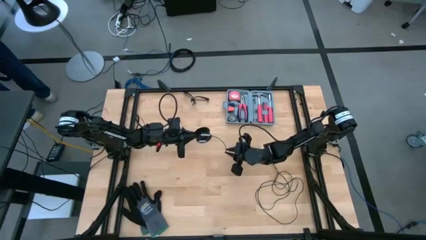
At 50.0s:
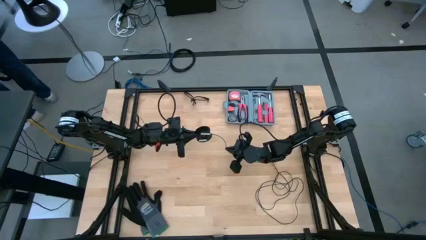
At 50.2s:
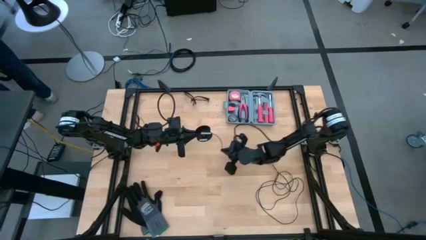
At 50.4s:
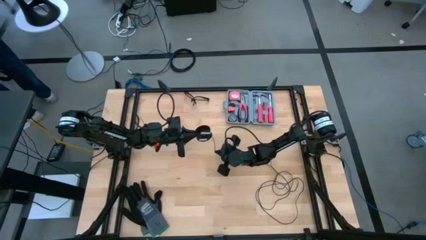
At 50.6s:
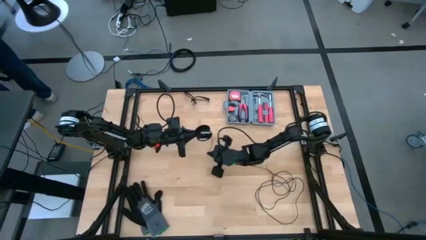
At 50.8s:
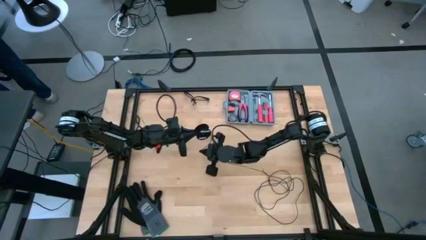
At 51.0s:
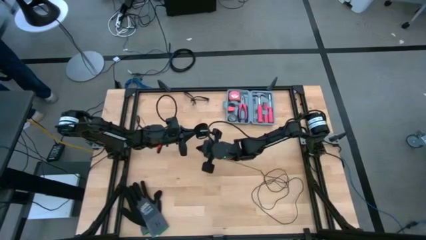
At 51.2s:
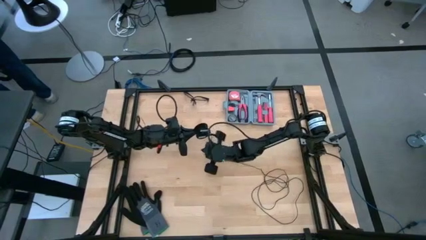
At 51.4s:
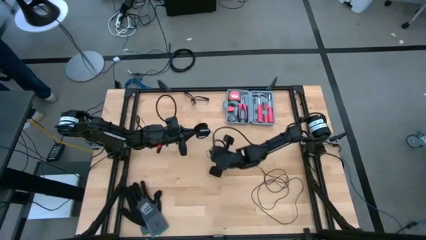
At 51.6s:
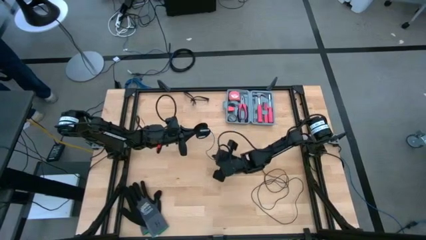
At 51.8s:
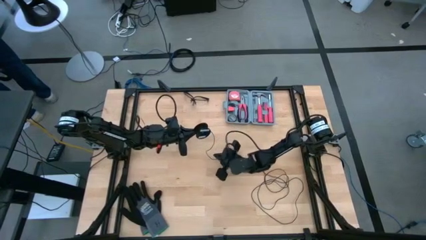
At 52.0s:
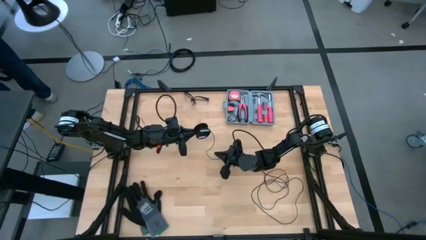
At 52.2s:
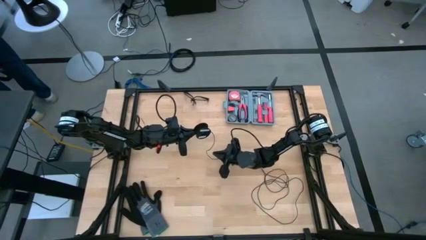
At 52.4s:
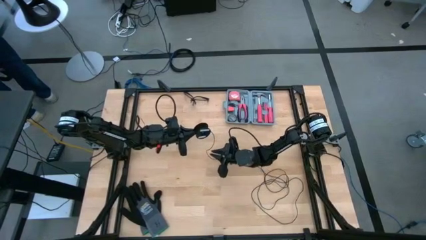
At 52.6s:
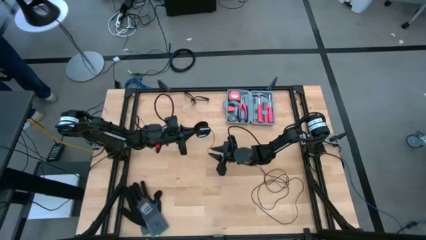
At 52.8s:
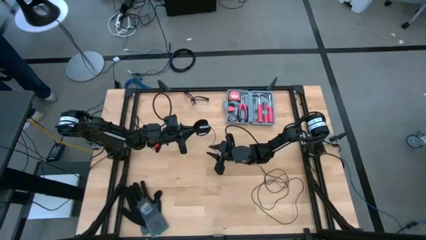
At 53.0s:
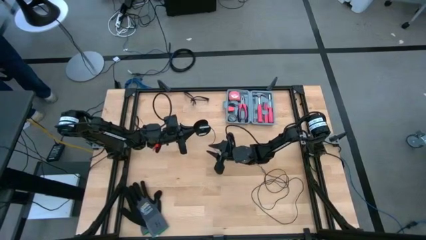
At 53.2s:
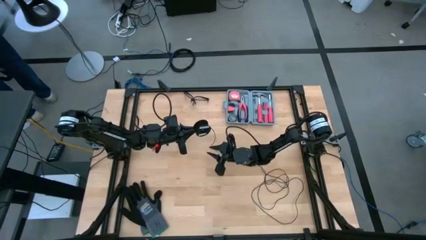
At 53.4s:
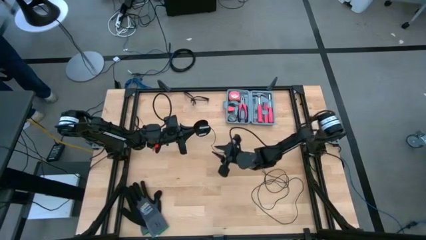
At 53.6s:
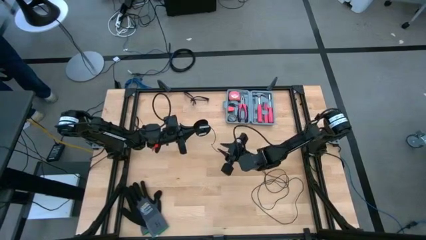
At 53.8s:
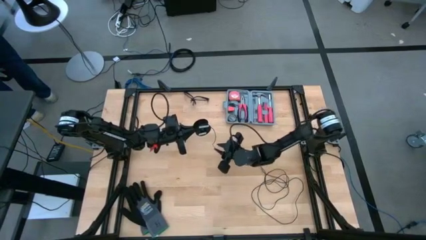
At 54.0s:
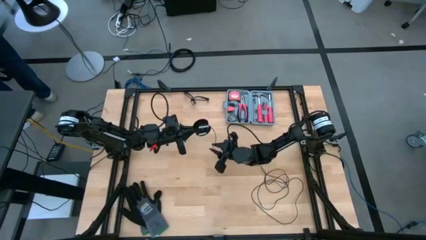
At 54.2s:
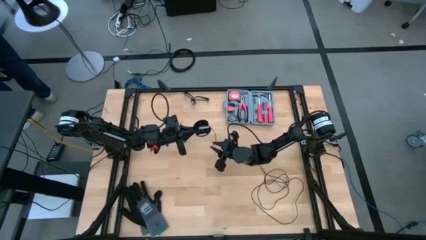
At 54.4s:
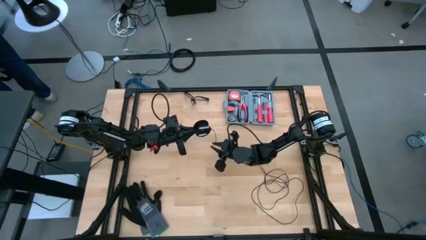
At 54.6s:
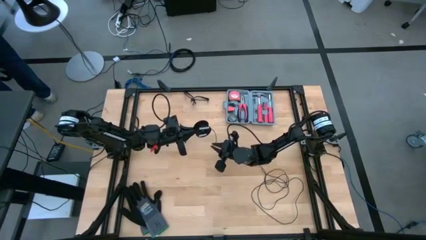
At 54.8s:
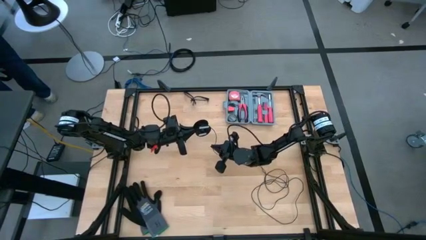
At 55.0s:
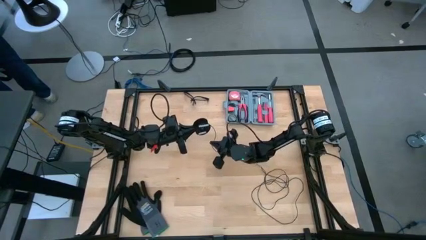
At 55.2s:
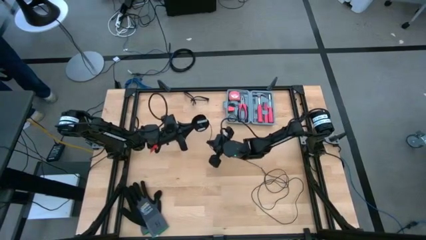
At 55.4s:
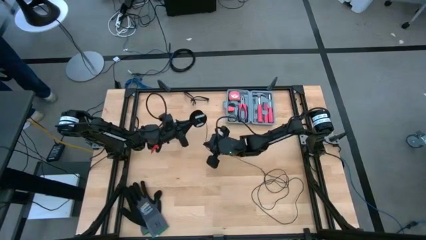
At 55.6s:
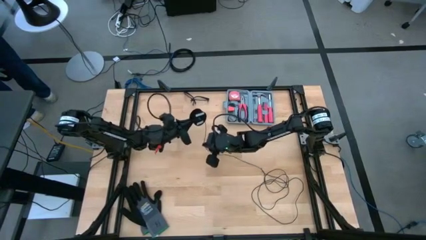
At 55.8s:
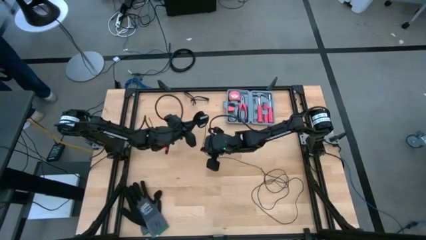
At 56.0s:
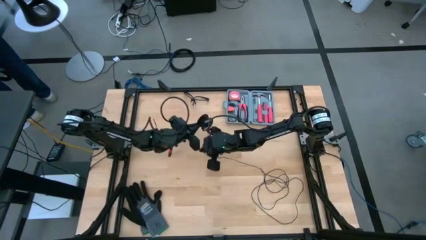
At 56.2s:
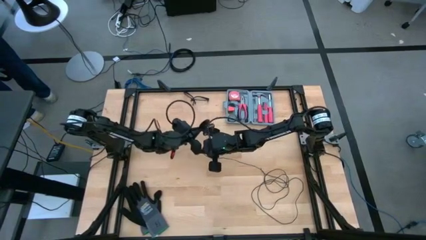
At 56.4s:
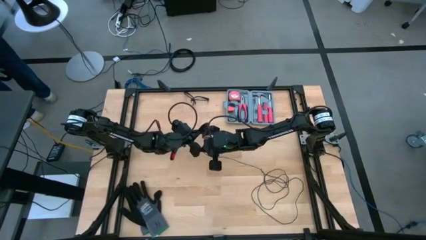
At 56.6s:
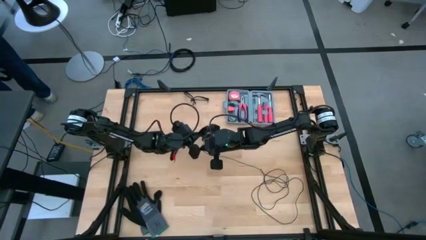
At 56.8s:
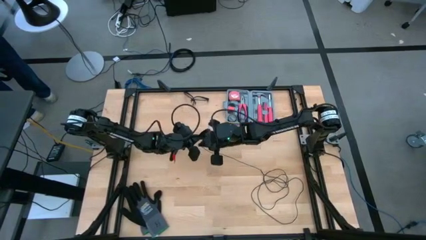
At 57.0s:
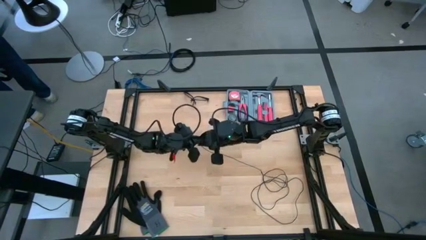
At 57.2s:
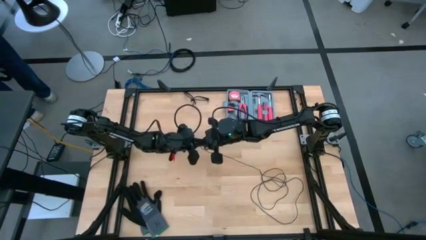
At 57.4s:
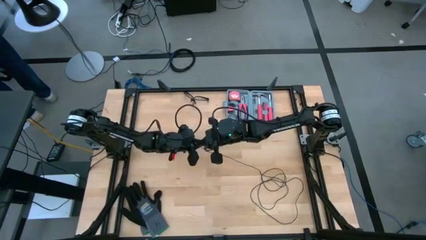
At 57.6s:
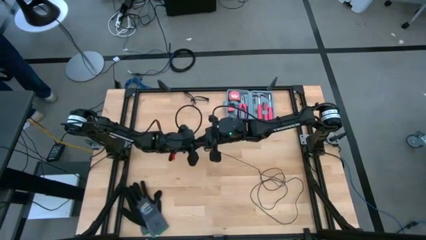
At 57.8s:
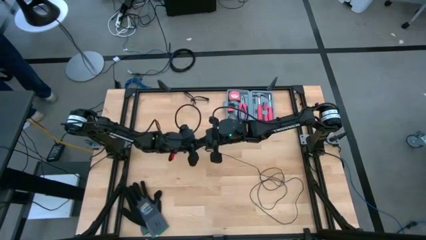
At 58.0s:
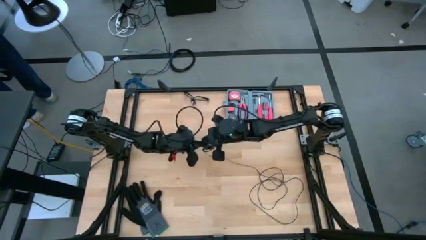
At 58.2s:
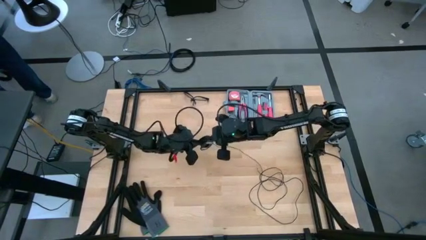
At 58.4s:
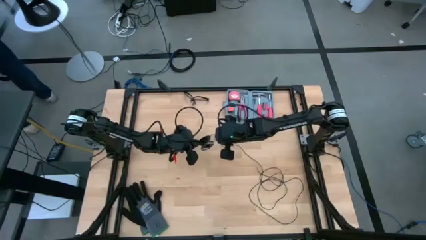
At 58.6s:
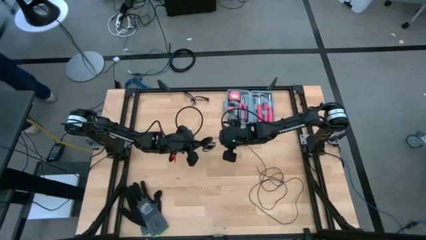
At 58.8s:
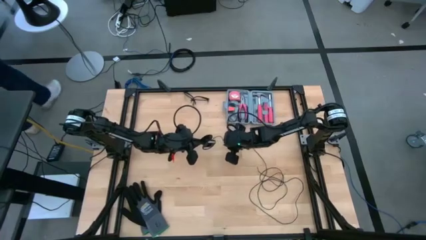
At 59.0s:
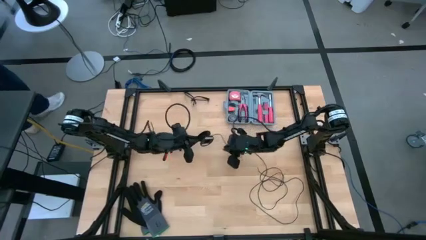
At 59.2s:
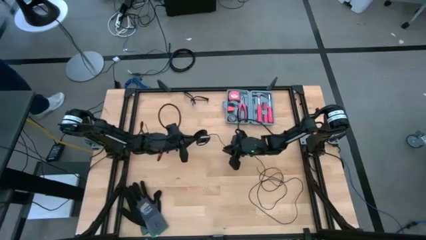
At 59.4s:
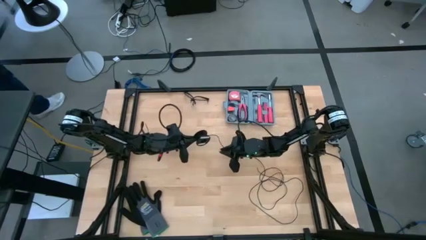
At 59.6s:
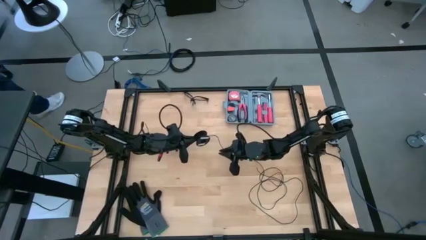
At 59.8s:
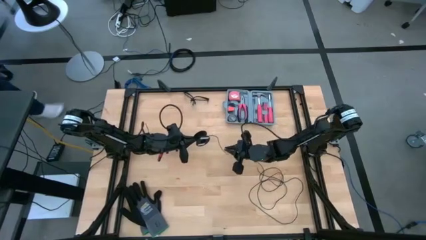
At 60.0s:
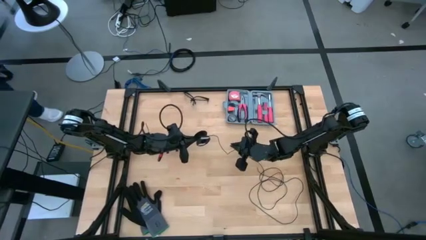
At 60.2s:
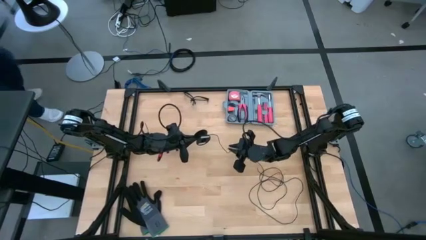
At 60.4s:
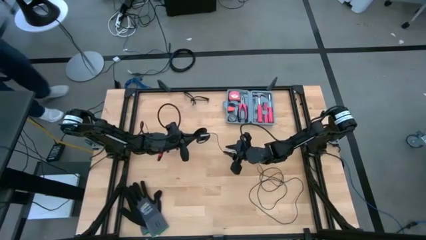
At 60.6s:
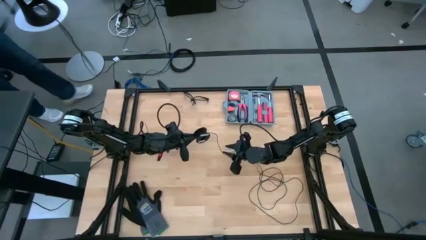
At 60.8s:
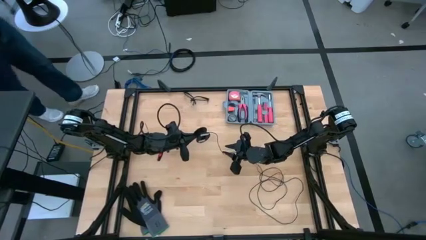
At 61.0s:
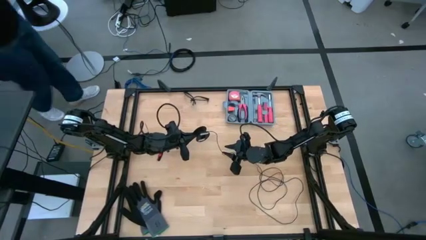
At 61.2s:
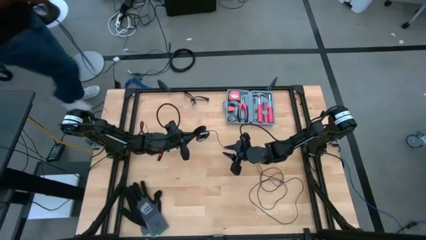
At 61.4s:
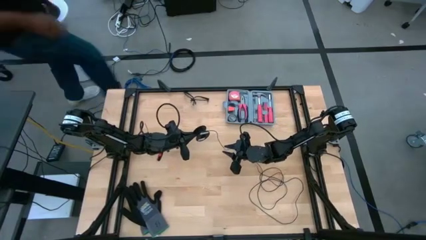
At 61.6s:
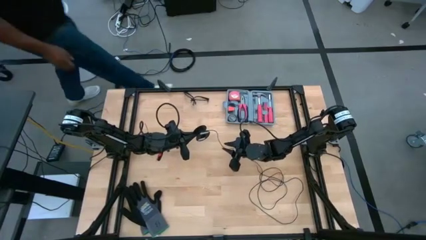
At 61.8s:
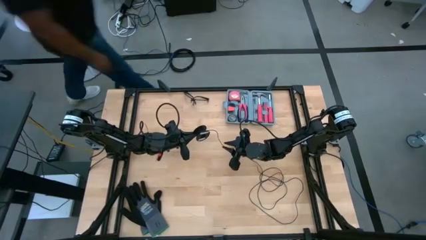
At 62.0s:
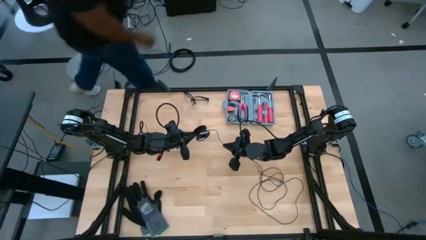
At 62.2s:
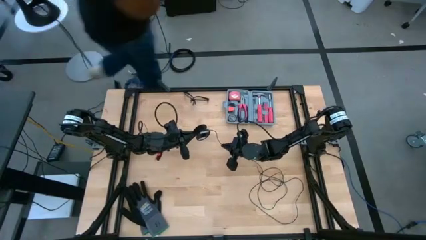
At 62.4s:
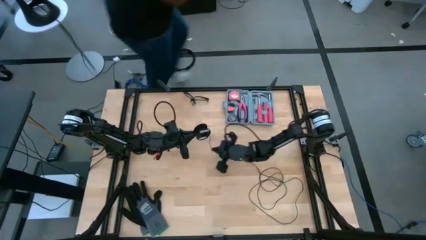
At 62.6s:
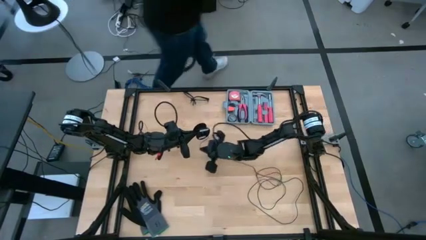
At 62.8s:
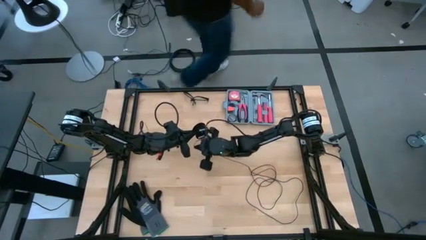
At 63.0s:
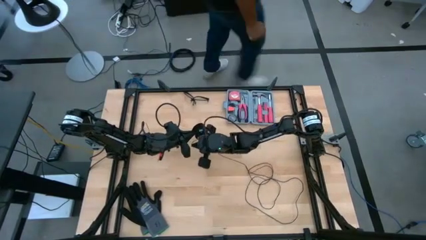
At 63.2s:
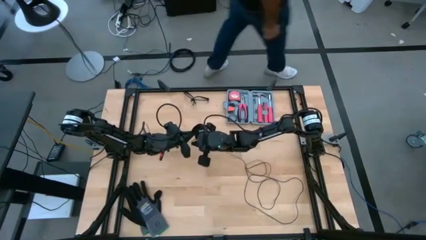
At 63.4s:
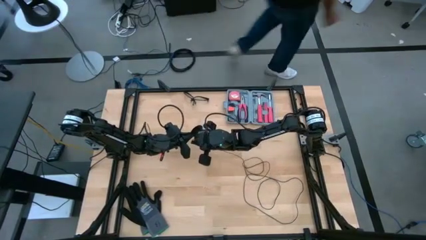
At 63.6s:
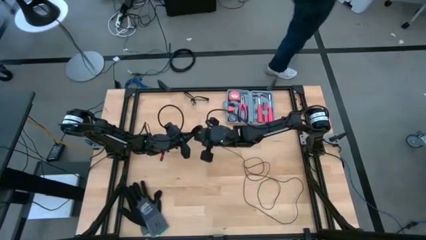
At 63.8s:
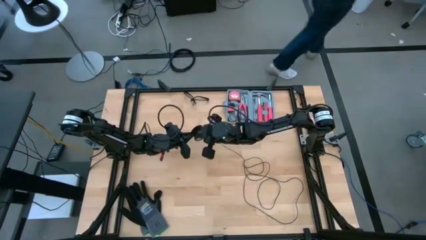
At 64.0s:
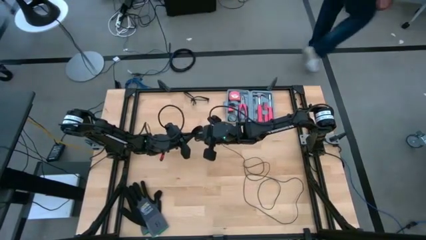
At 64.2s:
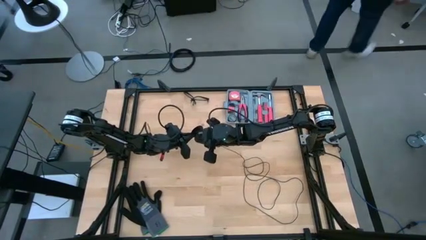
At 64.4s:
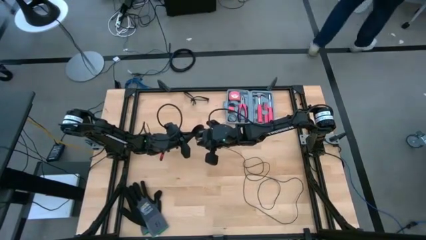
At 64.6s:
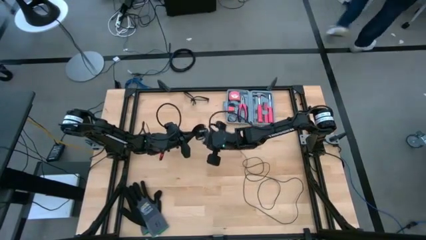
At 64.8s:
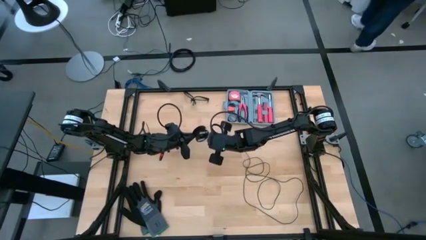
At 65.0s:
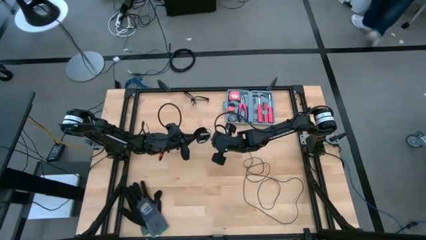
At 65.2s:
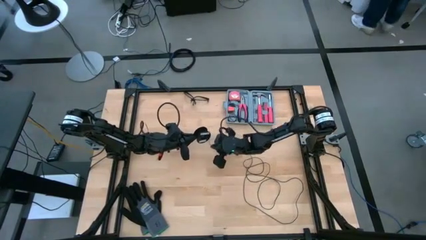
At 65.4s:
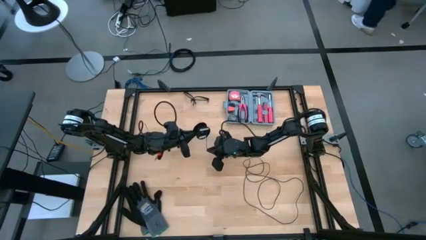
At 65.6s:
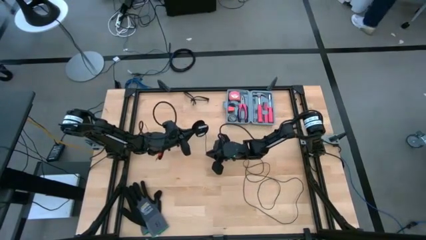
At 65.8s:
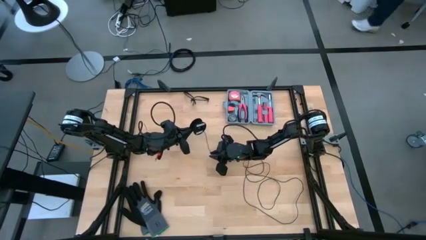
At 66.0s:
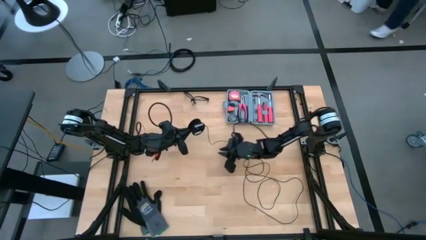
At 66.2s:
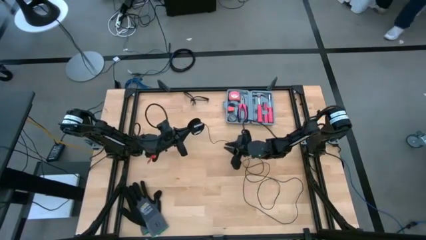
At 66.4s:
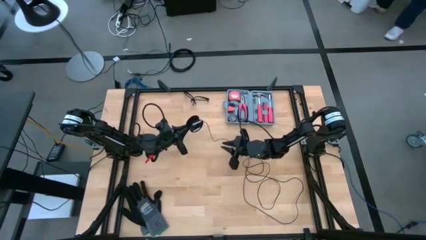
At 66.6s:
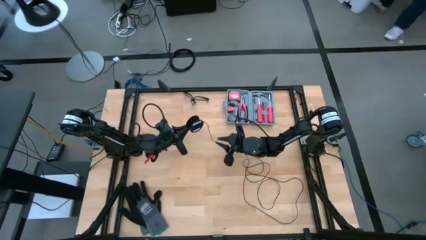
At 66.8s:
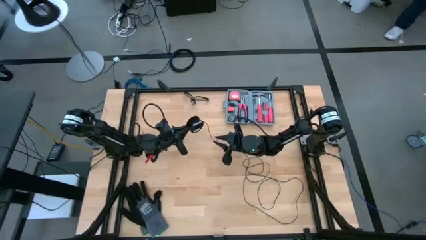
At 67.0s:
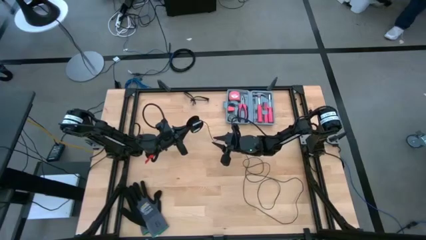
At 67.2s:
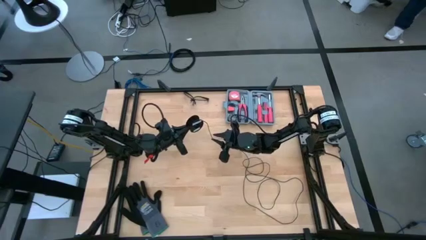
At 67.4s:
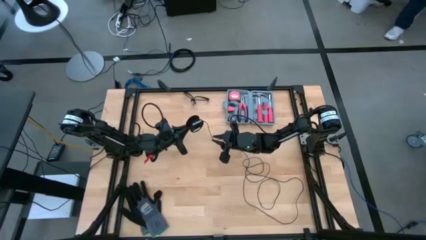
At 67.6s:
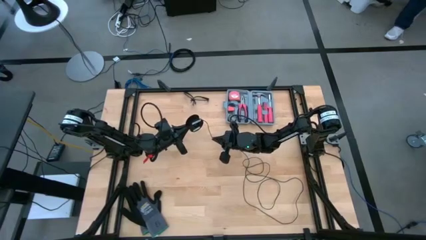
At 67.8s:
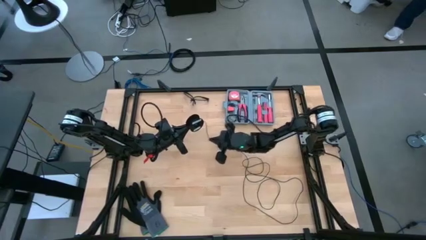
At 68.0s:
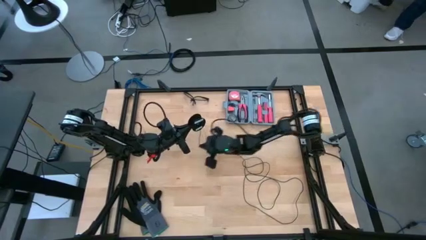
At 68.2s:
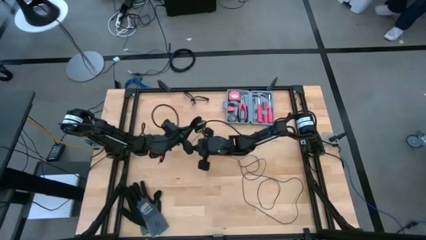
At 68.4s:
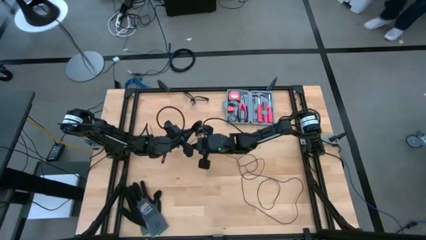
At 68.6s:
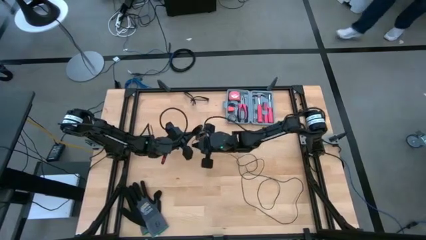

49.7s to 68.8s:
Task: Coil cords
Coil the black wire onto the spool
